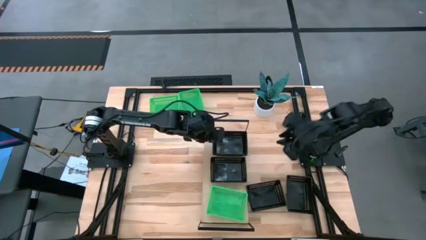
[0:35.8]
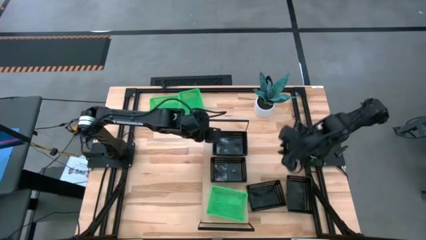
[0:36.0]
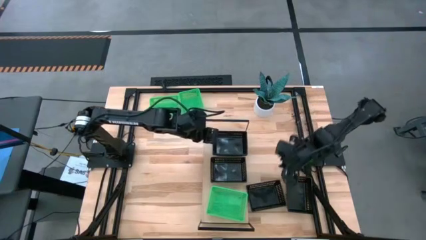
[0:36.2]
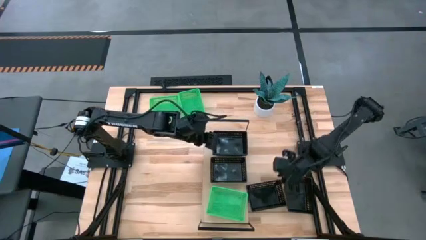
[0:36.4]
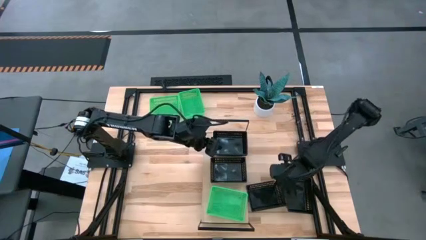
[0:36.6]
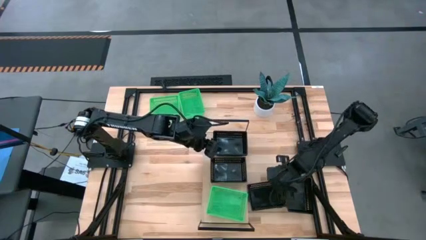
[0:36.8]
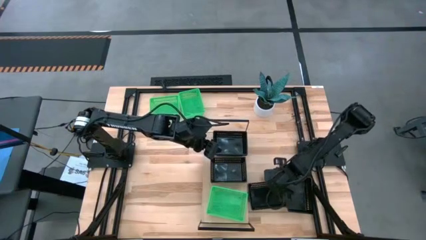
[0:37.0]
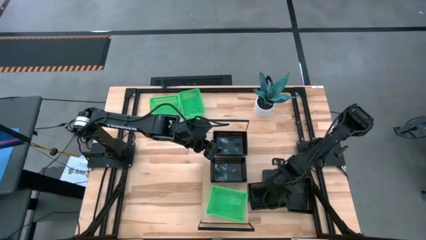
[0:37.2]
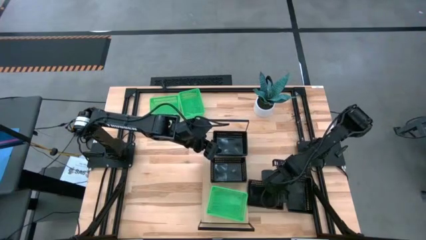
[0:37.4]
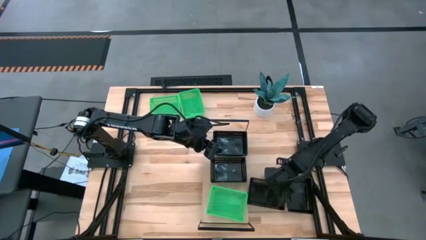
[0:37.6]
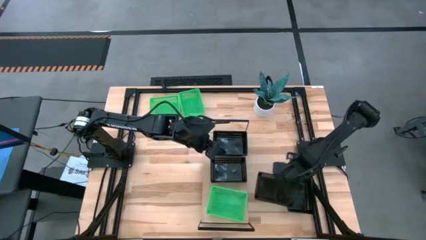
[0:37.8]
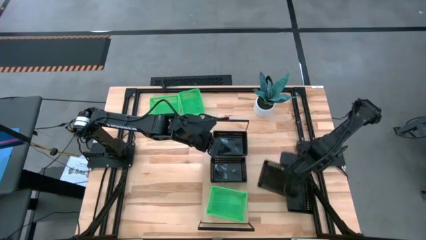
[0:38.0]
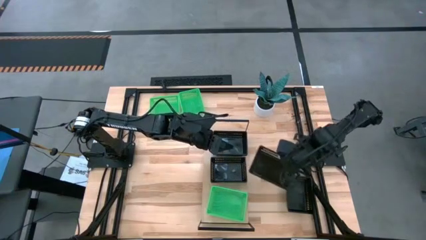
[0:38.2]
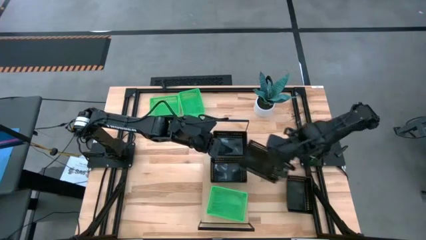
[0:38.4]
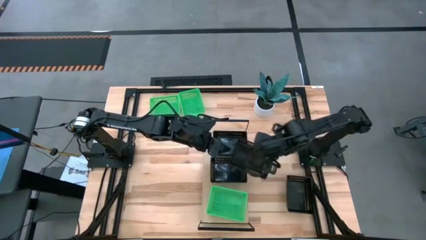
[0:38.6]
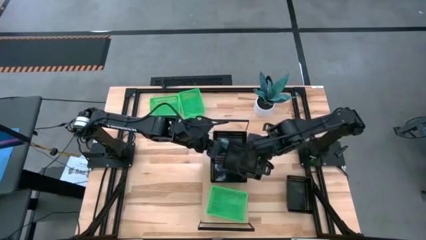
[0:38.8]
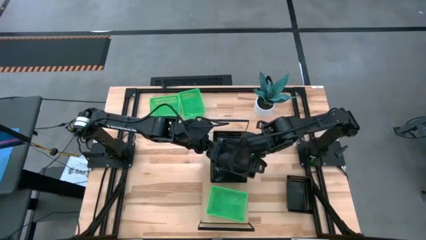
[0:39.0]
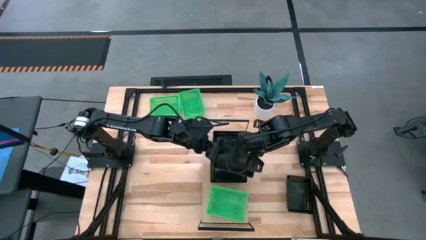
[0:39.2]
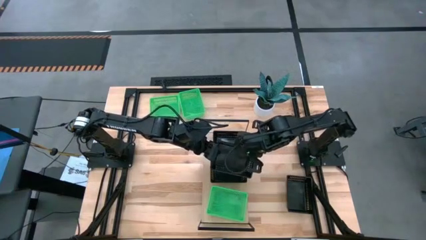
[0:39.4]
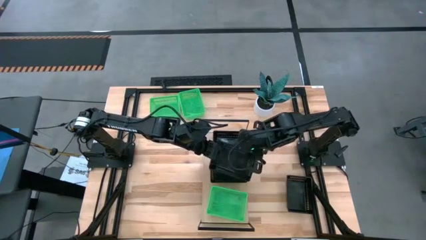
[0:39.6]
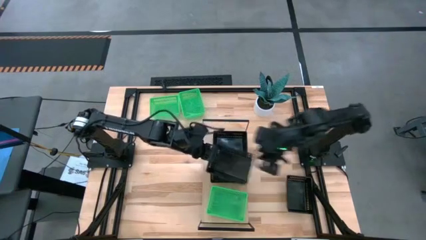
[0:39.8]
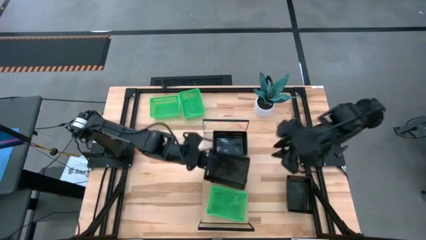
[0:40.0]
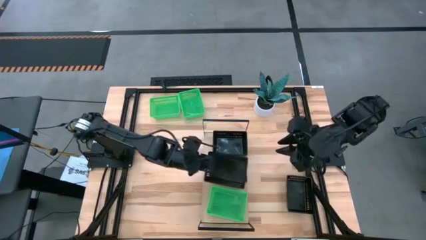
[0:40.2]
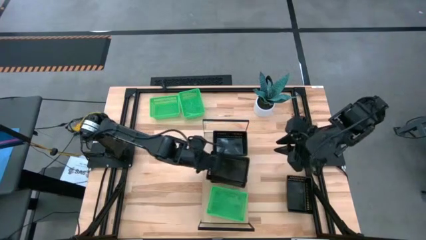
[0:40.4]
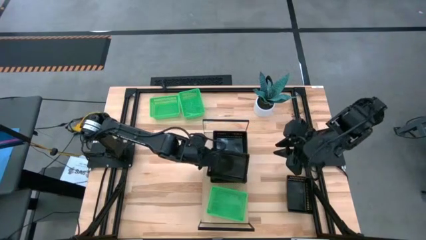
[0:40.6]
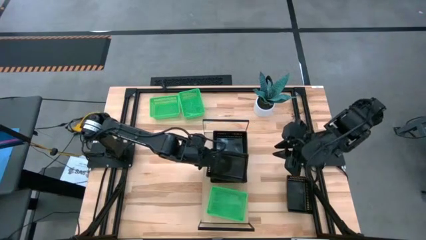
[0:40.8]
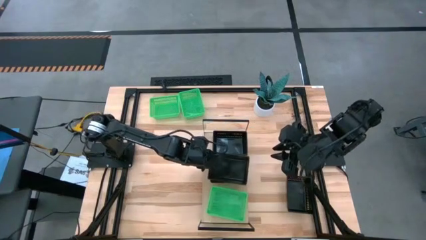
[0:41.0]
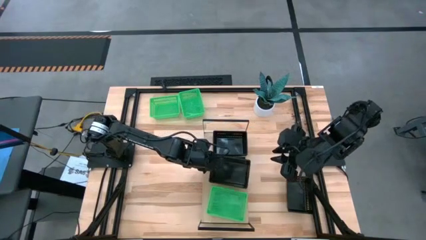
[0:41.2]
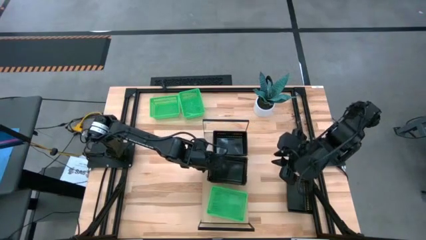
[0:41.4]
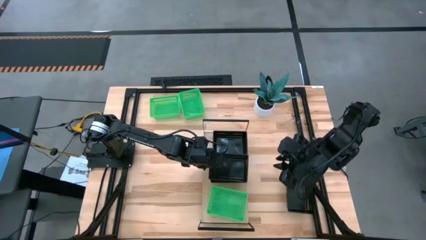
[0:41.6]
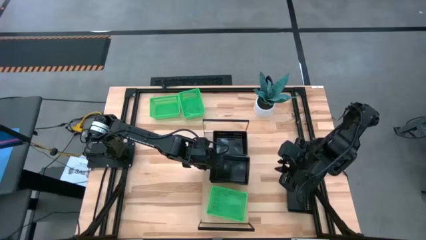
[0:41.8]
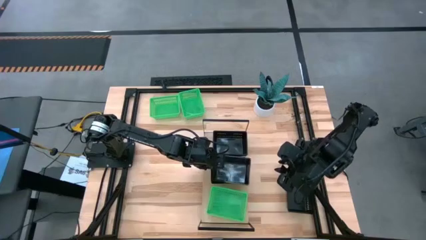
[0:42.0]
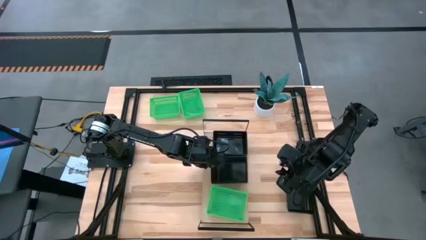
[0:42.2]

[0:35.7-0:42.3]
Task: Stack baskets on shelf by color
Stack the black bin on top of the black bin on the shelf

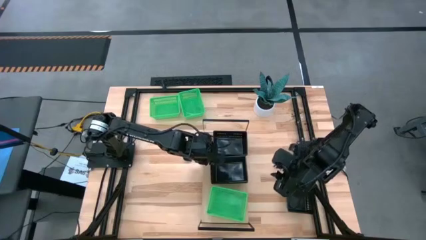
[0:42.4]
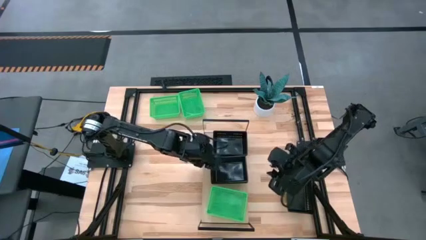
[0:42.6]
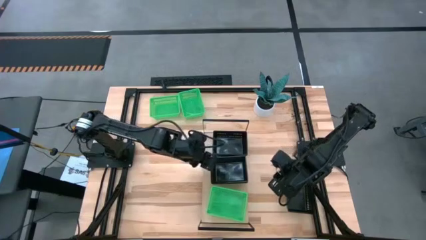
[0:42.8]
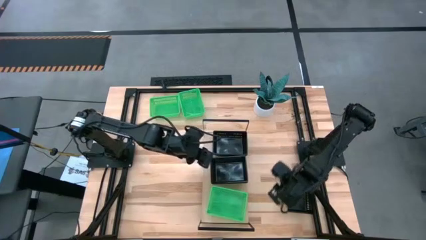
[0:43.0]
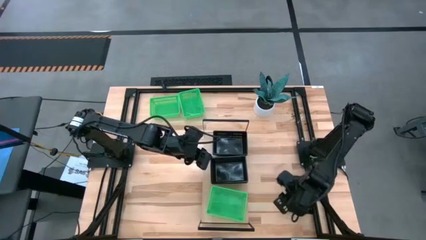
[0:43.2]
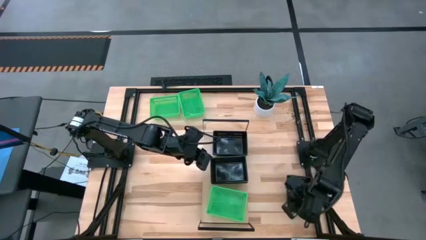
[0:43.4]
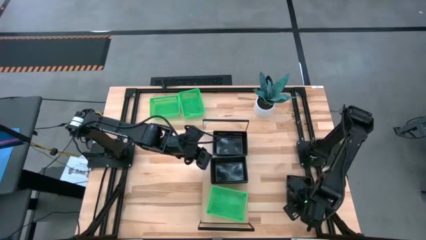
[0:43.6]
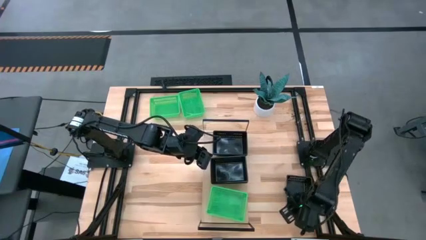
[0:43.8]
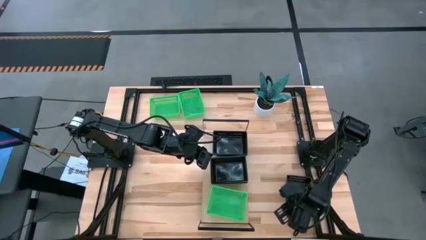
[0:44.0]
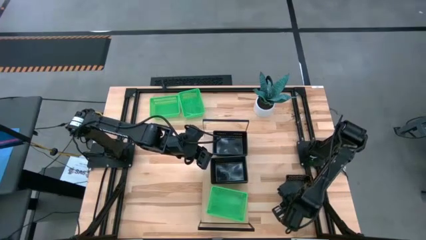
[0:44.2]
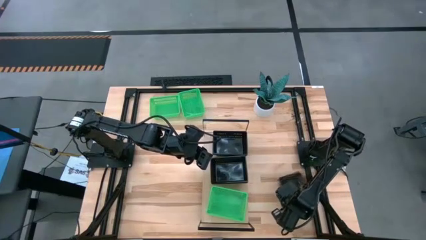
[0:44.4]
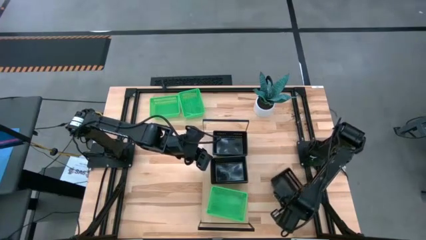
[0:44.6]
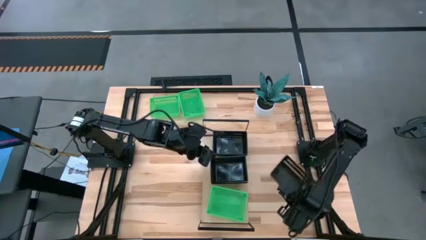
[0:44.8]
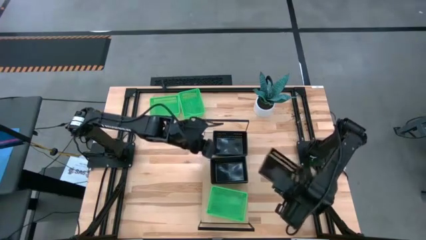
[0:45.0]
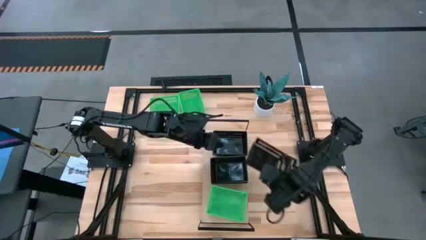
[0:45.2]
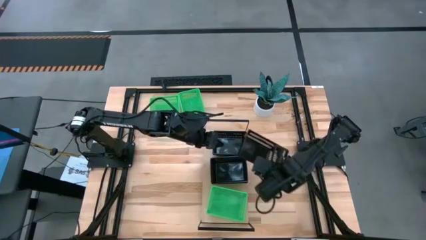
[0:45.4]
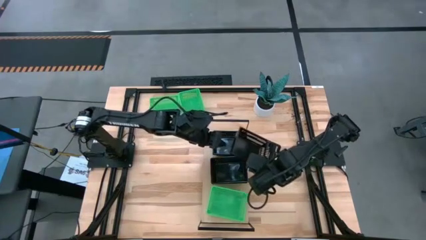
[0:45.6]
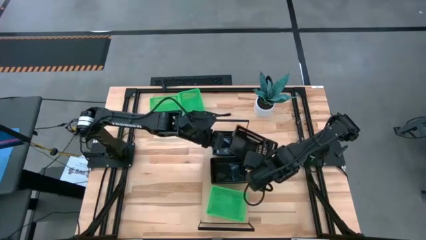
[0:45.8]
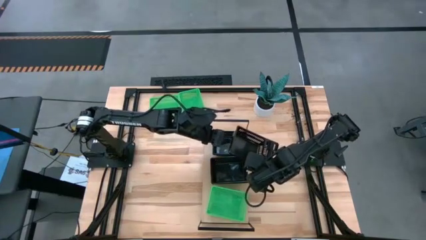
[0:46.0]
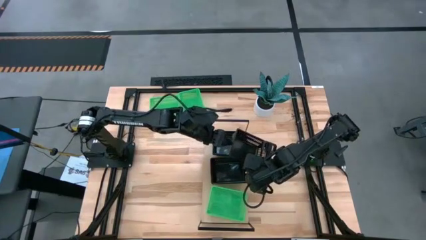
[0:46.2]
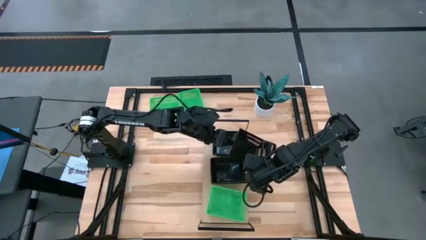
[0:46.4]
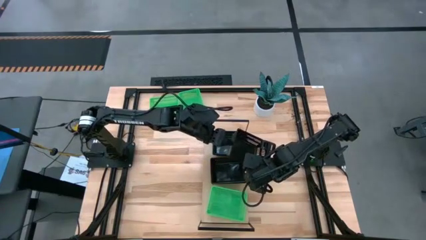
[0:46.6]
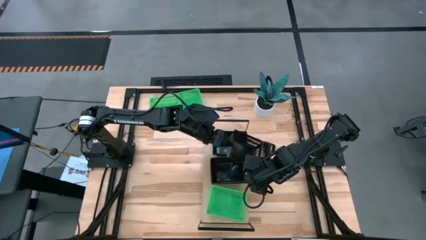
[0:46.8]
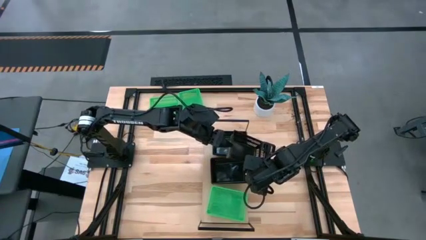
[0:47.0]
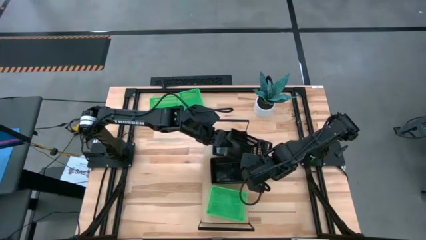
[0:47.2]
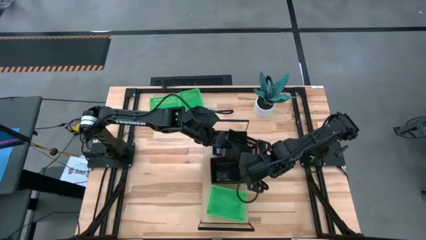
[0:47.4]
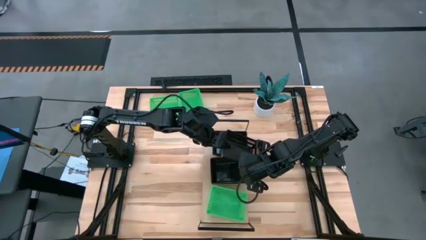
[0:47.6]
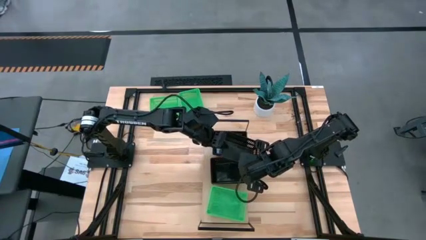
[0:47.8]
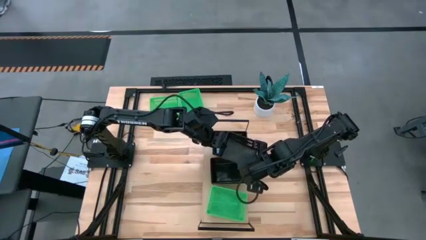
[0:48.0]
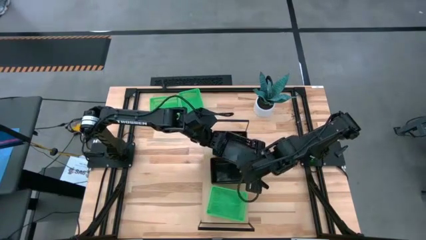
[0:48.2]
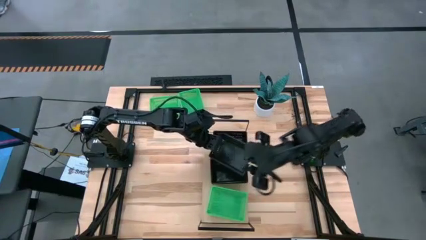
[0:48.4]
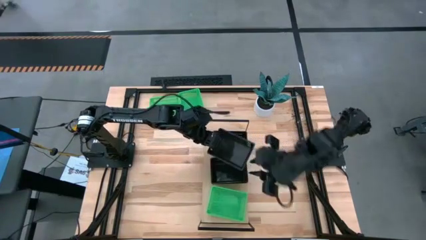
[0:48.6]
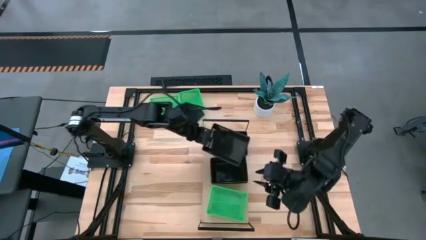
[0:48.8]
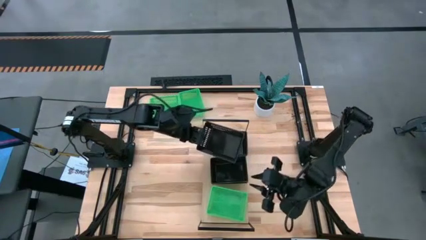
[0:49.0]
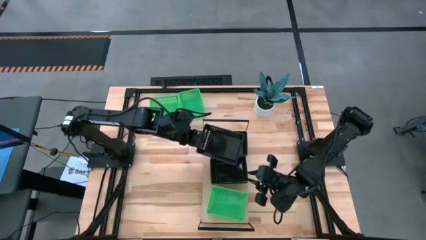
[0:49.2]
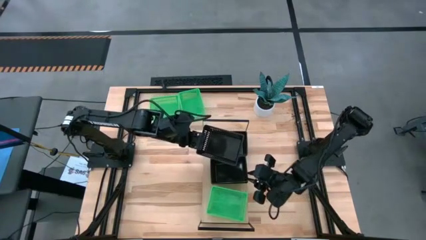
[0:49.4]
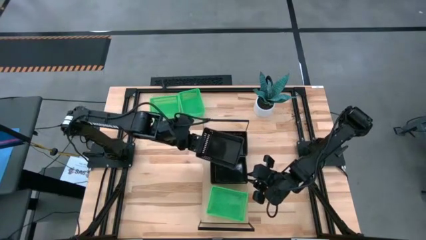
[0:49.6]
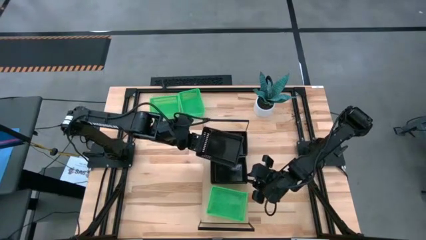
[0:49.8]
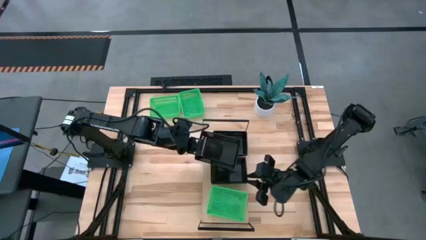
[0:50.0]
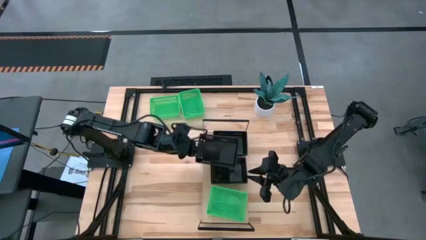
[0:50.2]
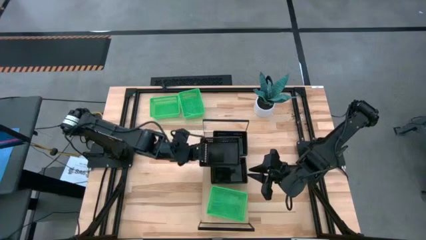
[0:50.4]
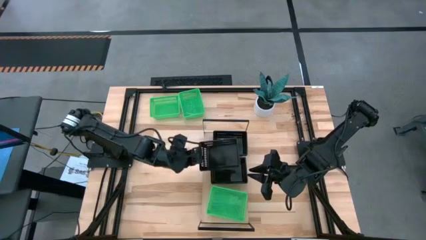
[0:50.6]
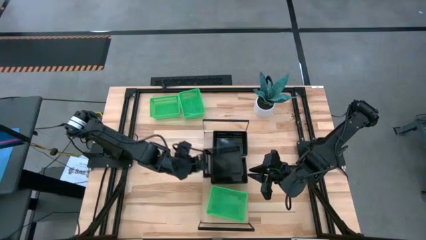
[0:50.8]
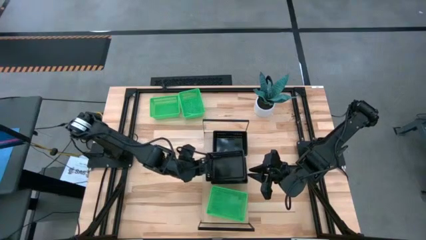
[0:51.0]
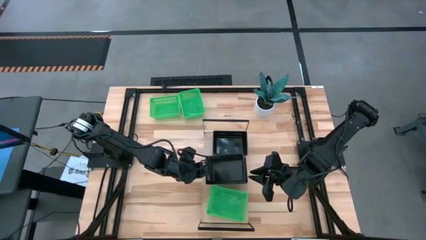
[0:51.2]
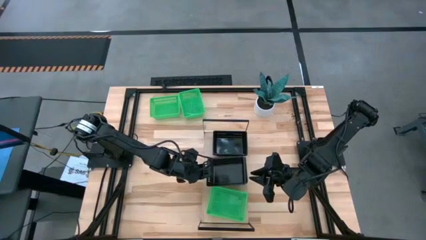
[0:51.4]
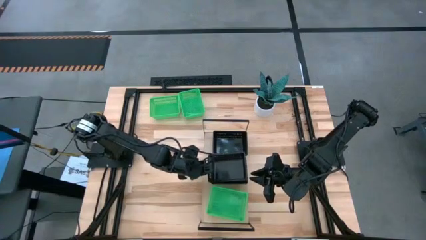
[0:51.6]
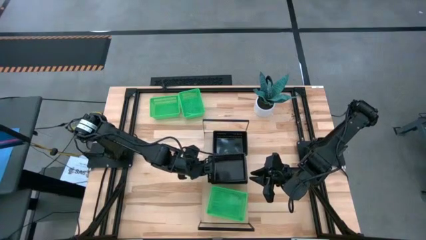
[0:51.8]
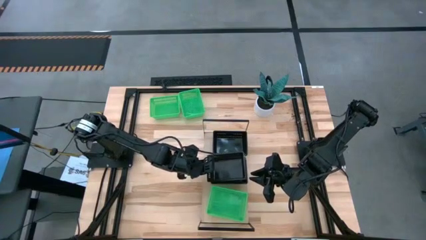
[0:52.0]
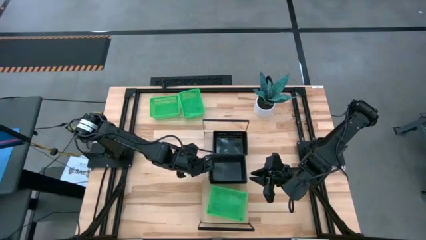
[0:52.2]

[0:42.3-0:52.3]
Stack the black bin on top of the black bins on the shelf

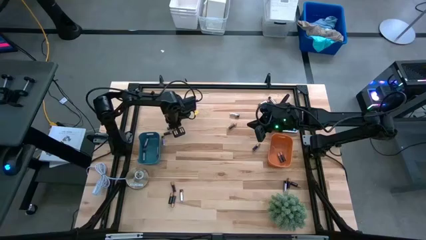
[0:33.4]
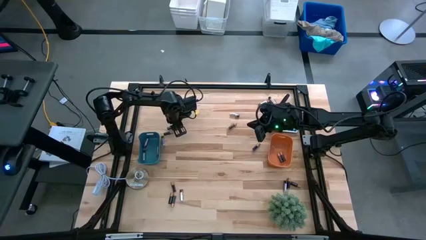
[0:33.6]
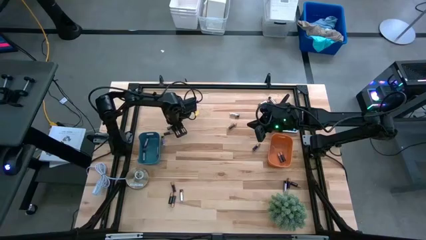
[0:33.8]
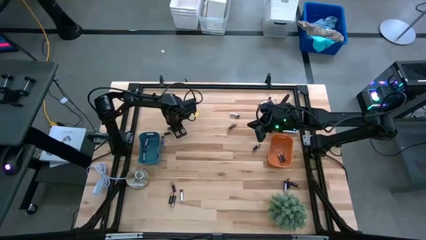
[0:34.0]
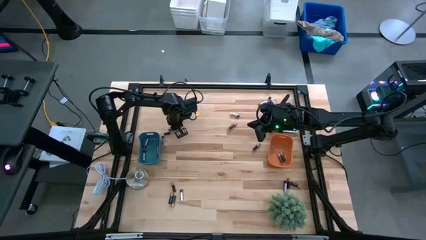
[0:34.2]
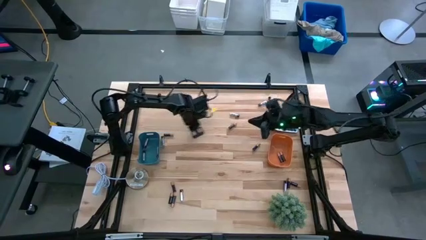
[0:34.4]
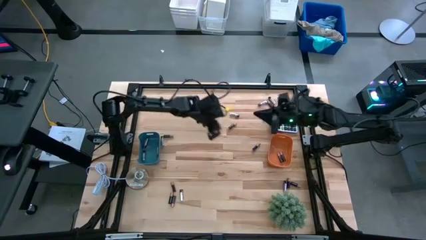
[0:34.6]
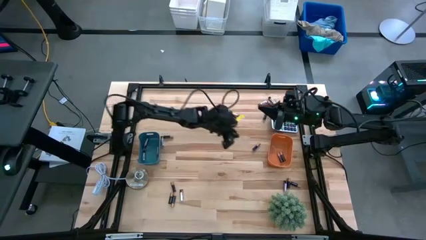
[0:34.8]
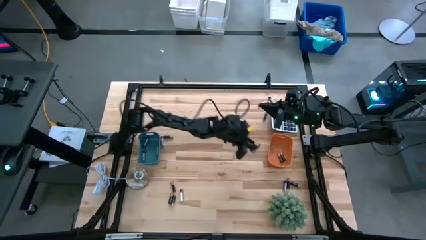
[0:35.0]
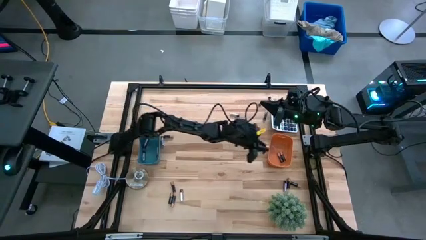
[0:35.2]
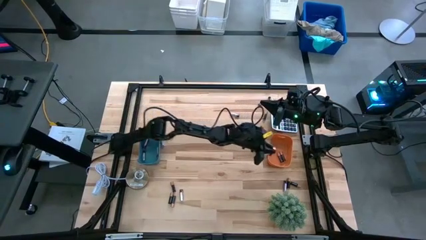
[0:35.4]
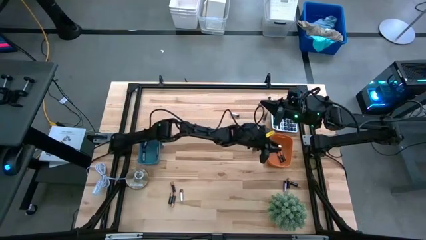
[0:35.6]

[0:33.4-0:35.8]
Task: Sort batteries
Put the black battery into the orange bin
